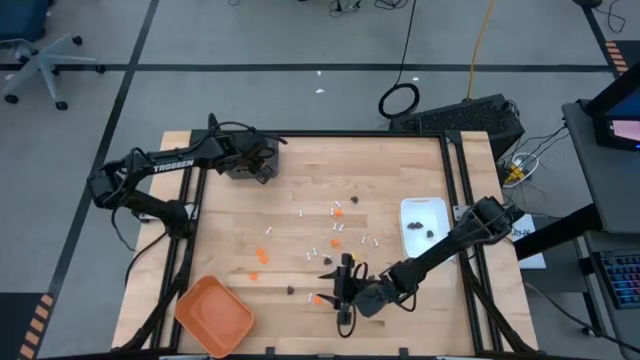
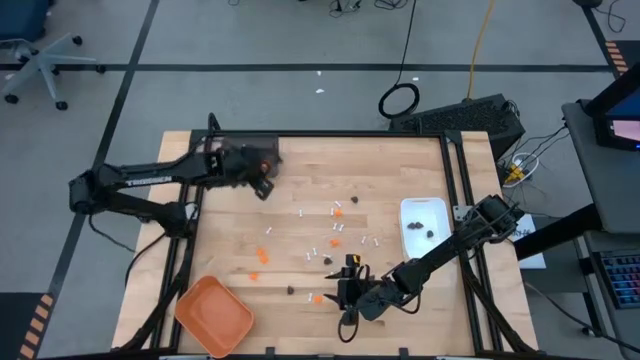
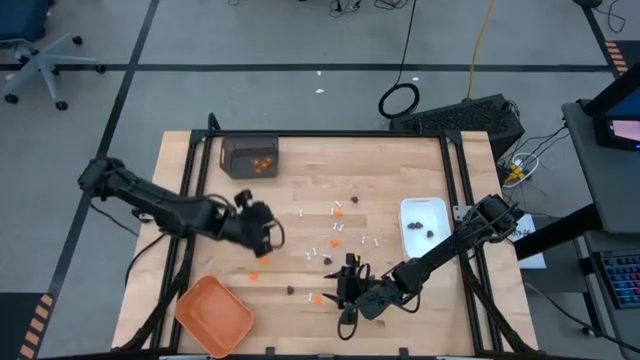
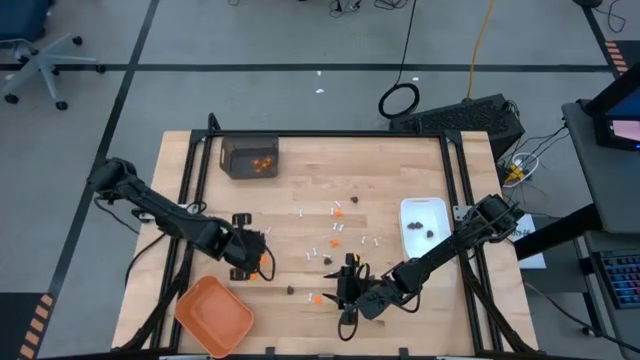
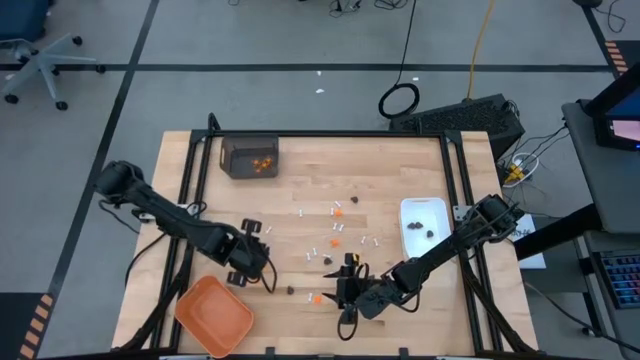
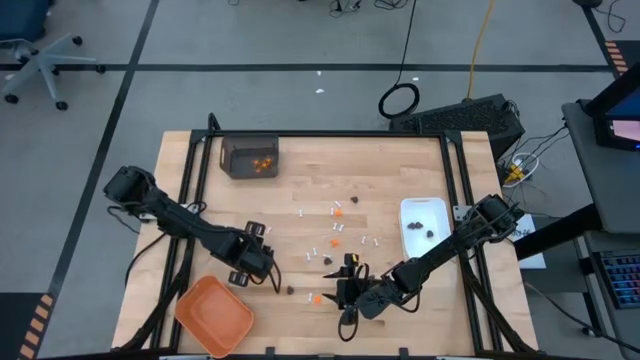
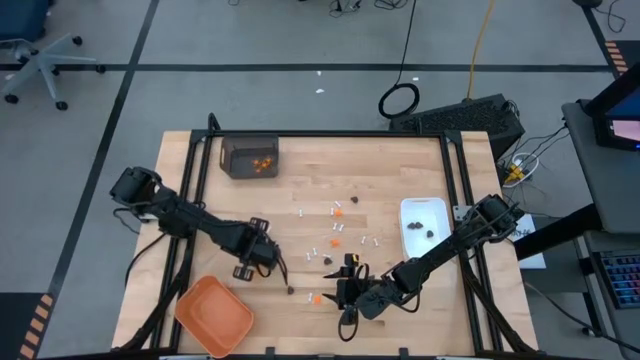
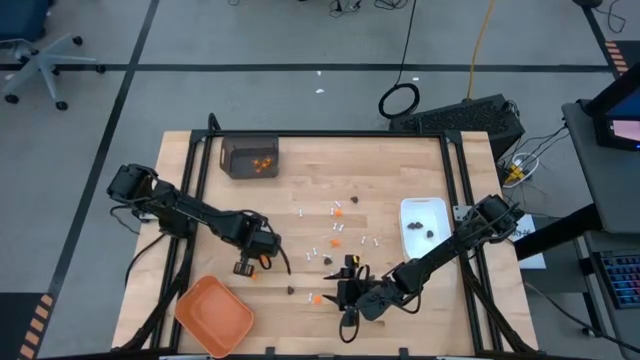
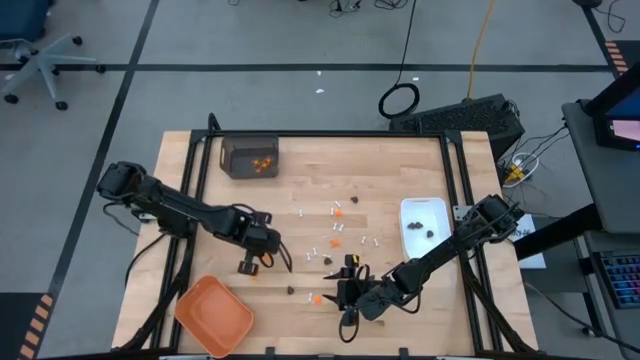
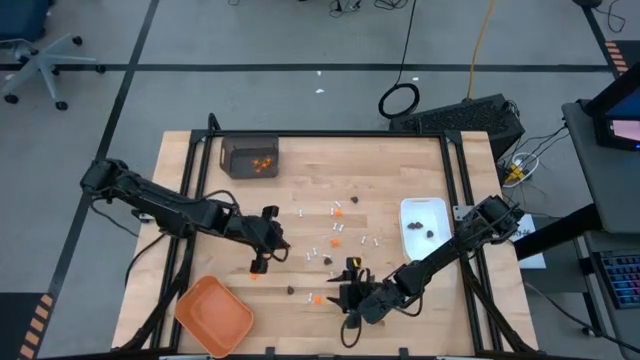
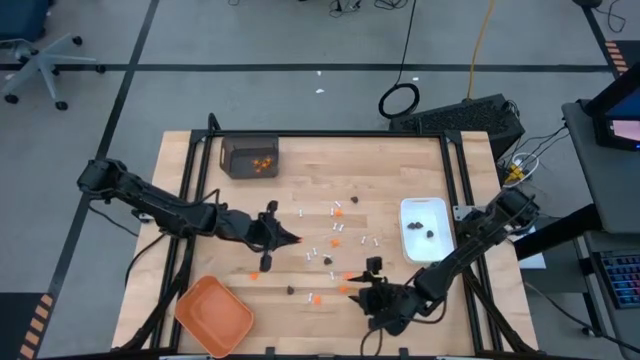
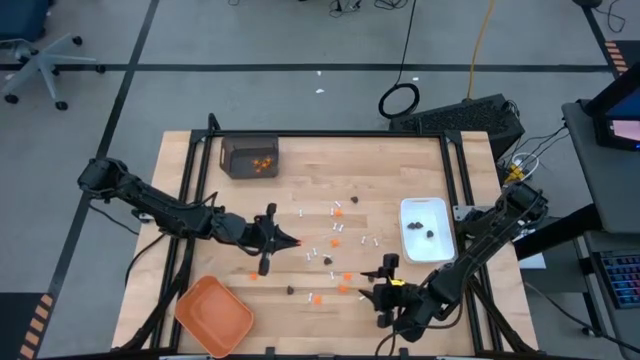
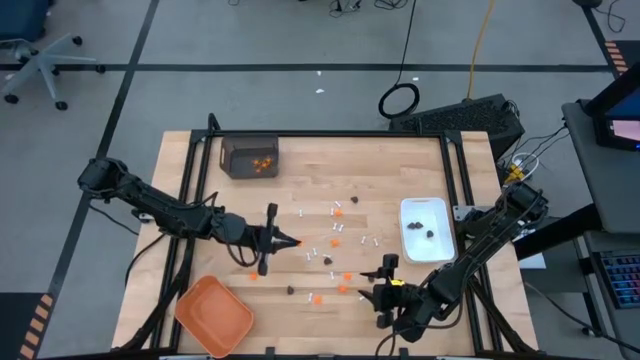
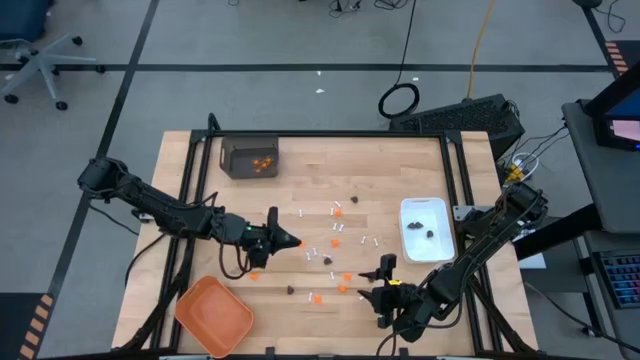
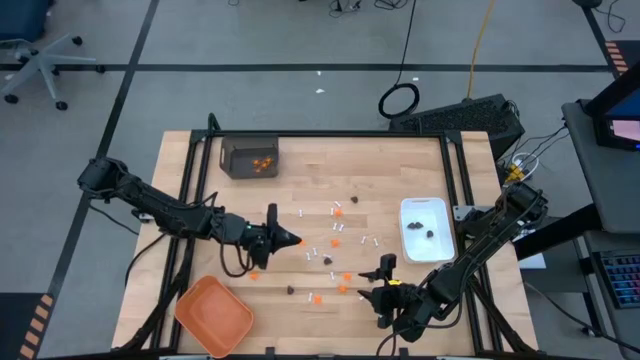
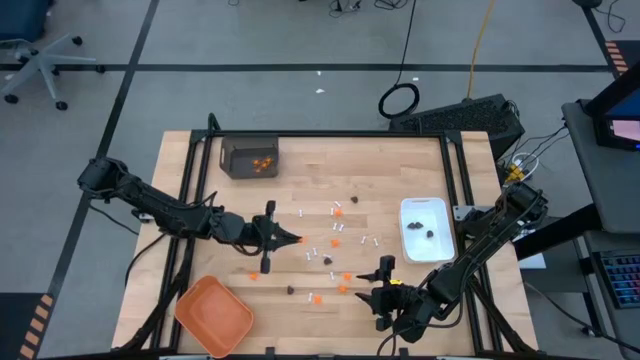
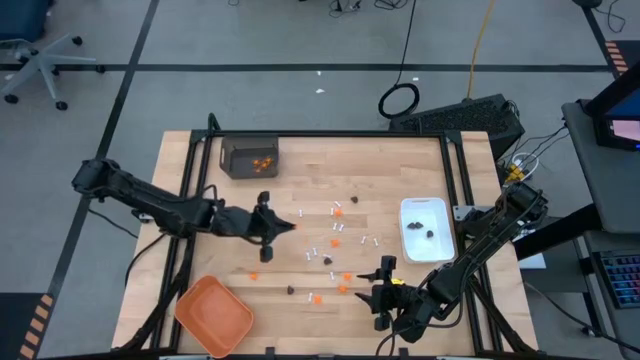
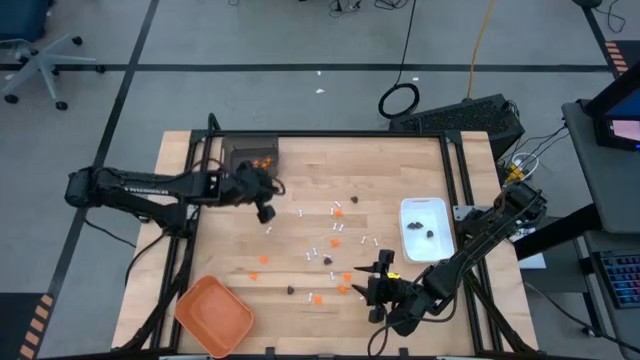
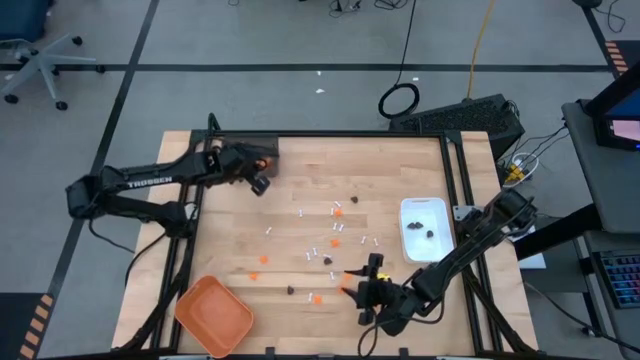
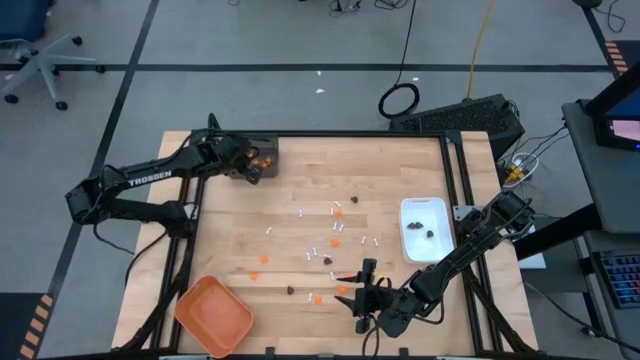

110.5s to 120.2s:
Task: Sort Halloween decoration
Put the orange spider toy into the black bin

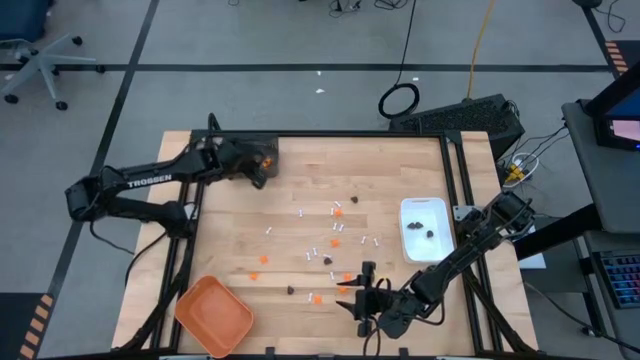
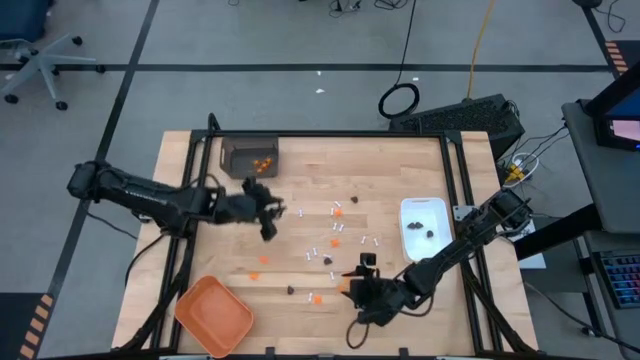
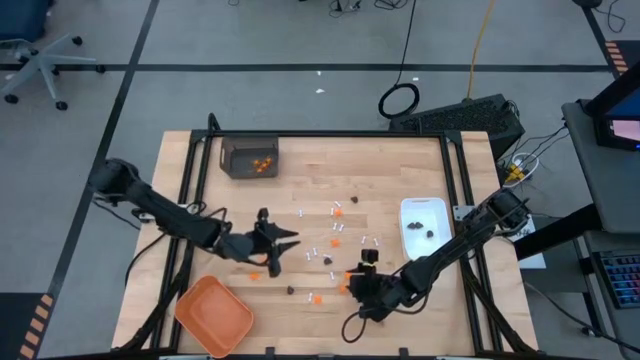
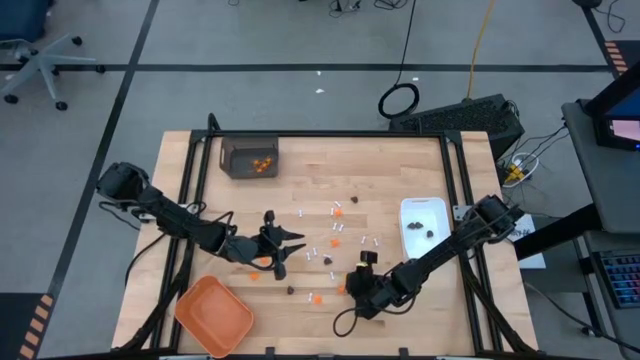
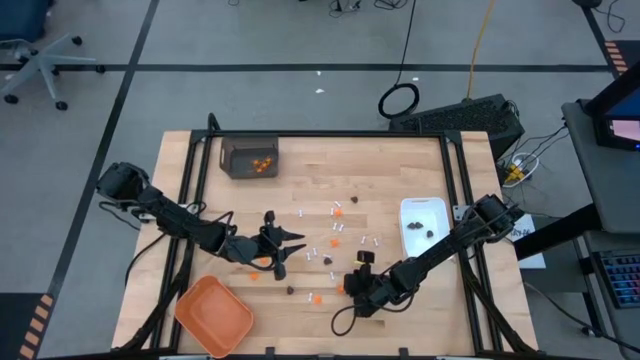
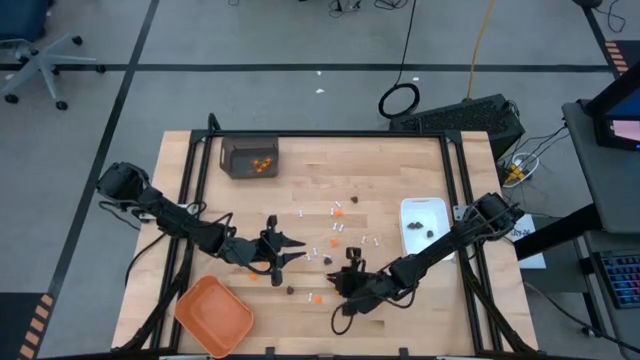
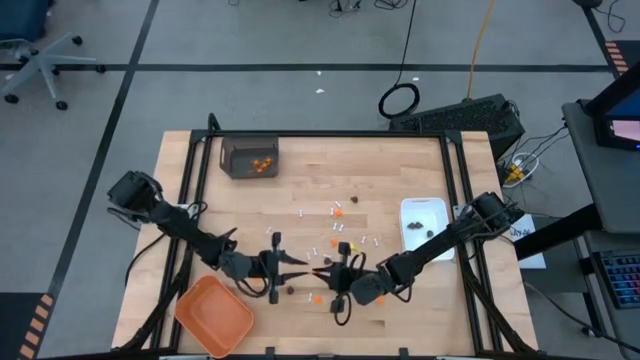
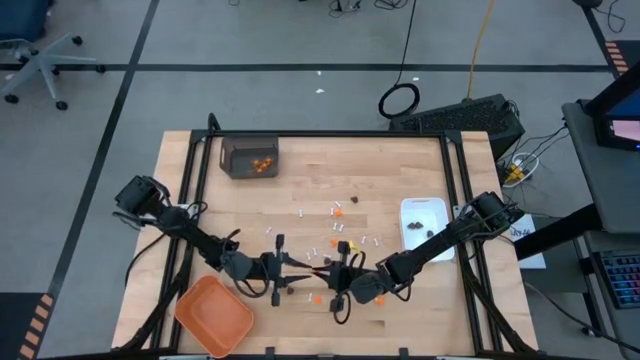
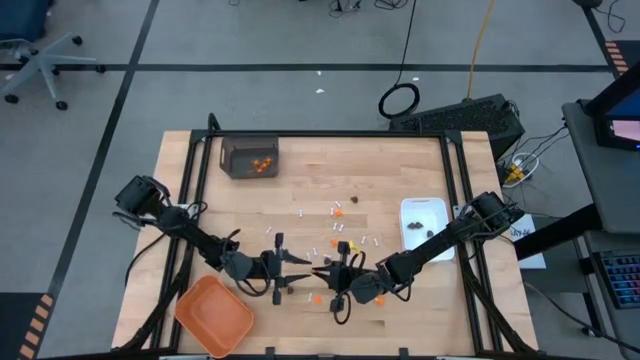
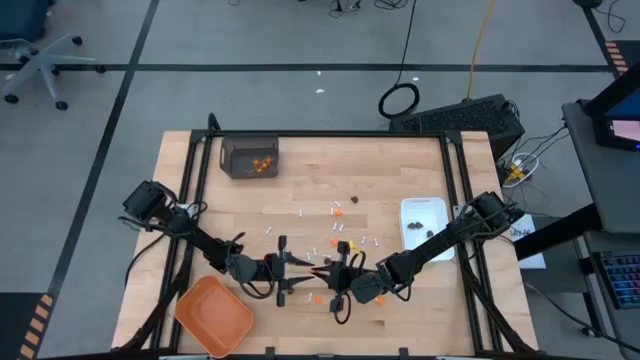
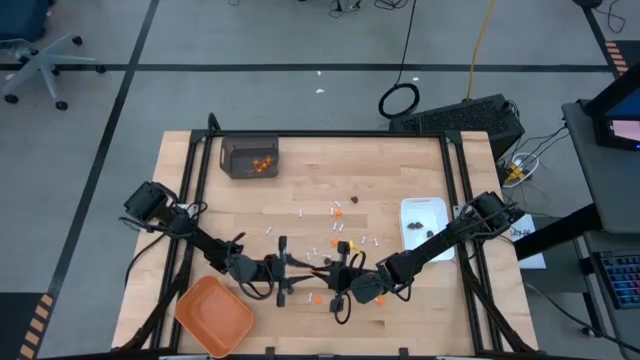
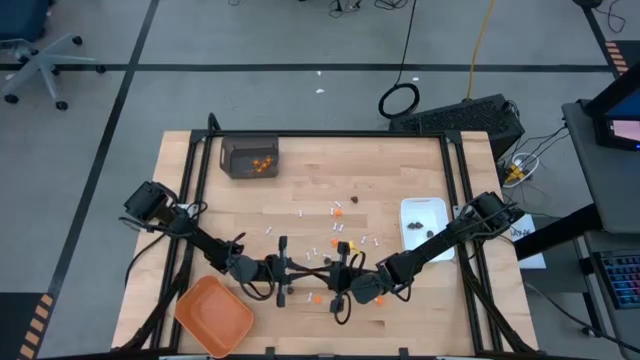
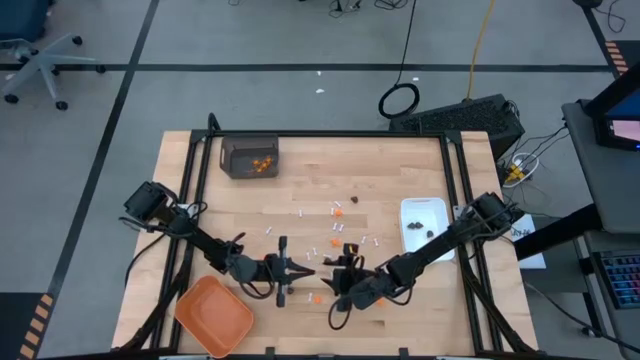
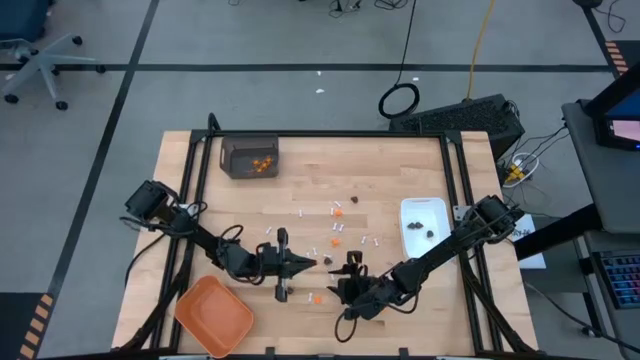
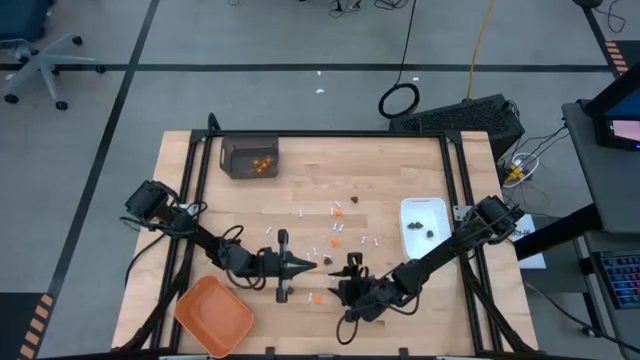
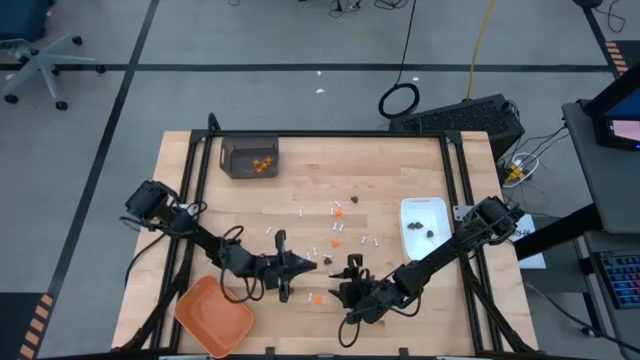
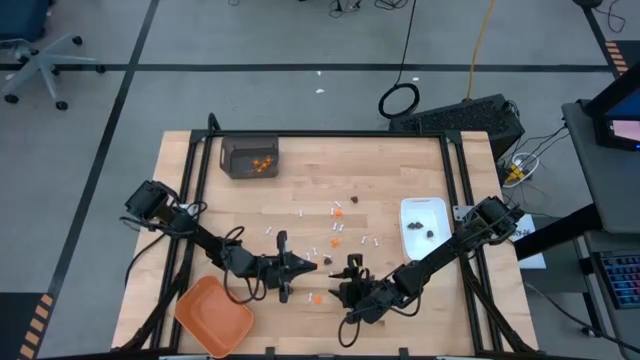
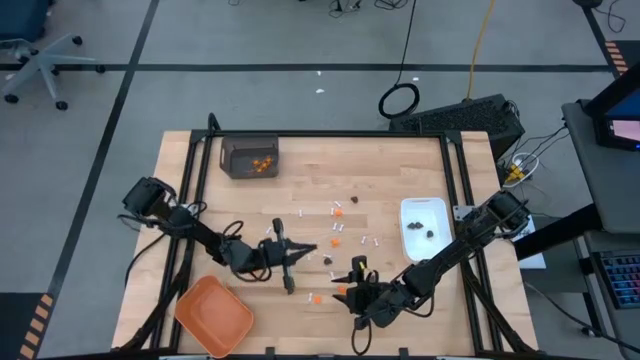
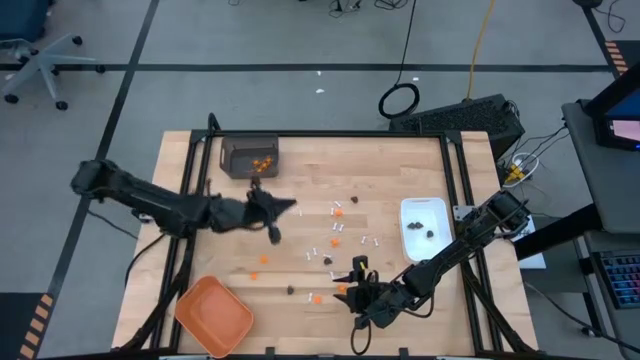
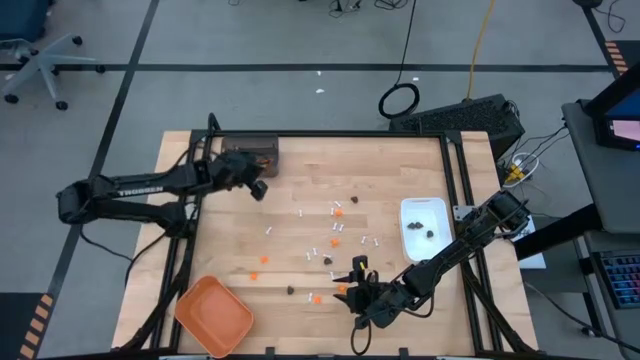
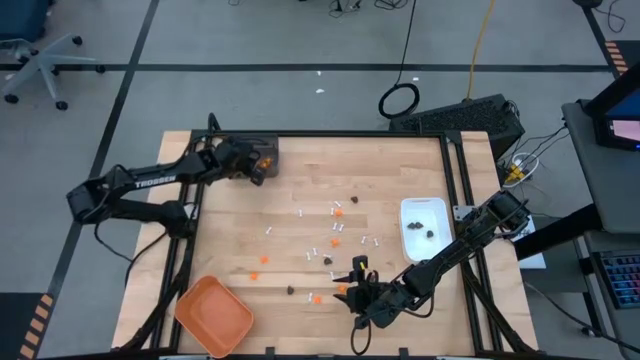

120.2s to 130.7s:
Put the orange spider toy into the black bin

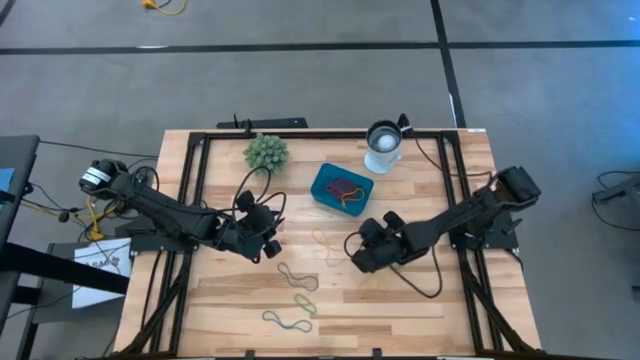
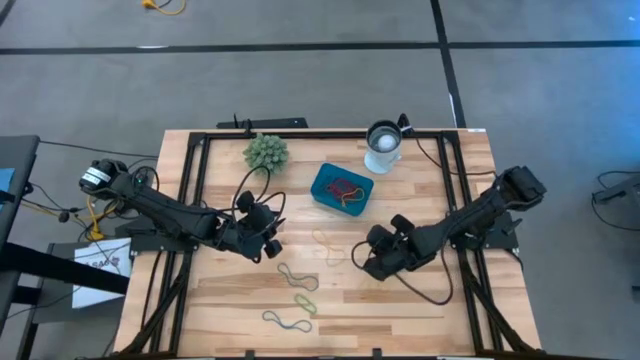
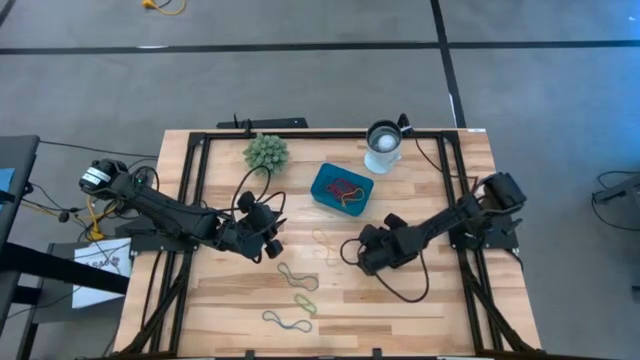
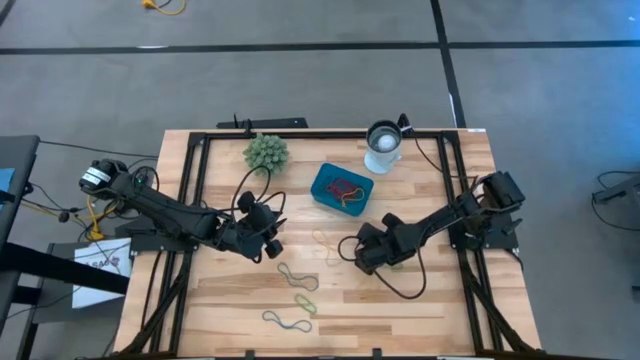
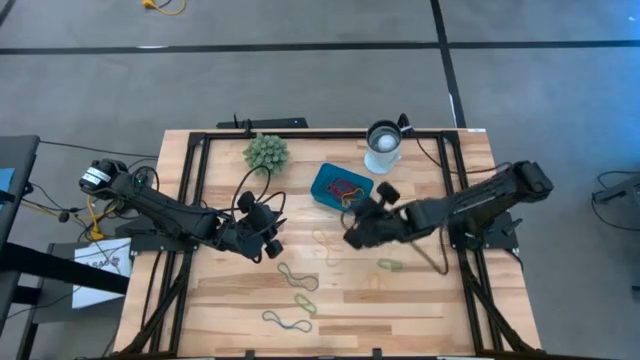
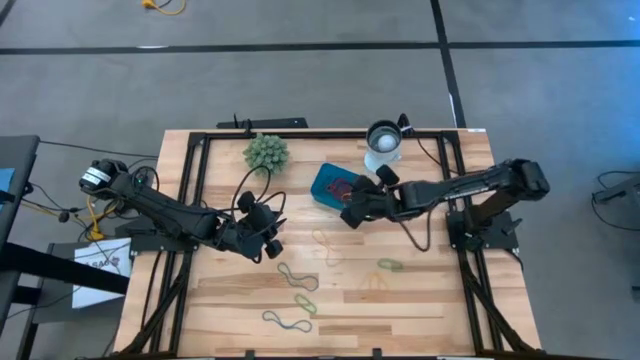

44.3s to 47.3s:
Task: Pick and place items into bin
Put the yellow rubber band into the blue bin
